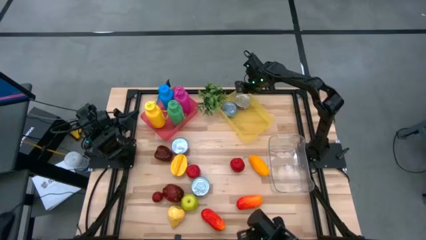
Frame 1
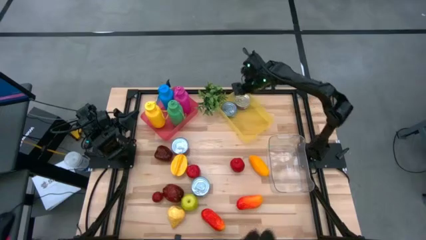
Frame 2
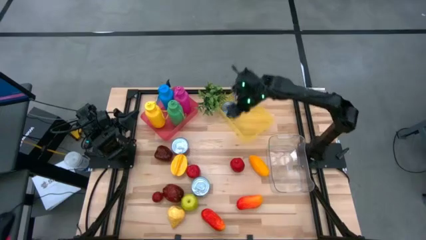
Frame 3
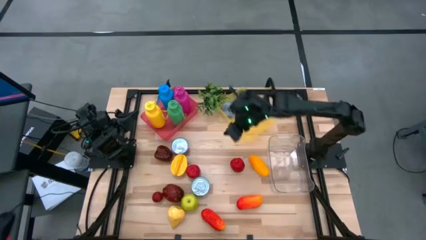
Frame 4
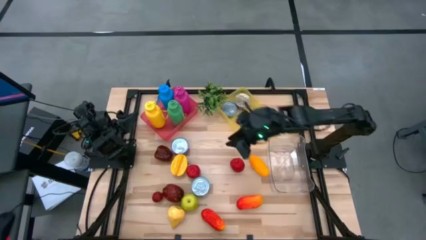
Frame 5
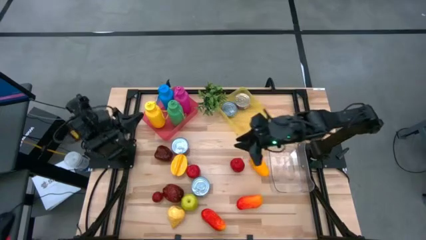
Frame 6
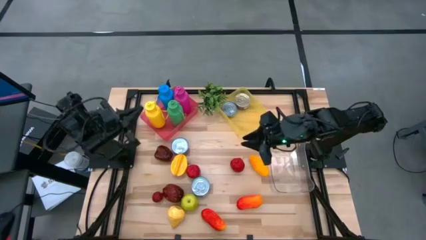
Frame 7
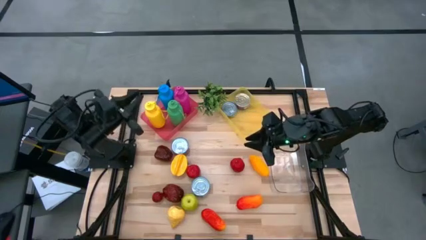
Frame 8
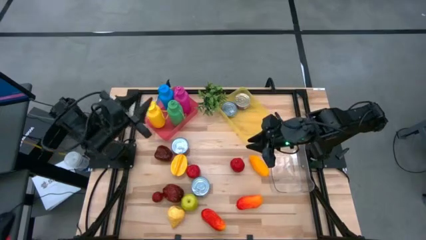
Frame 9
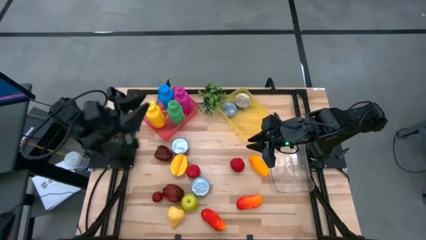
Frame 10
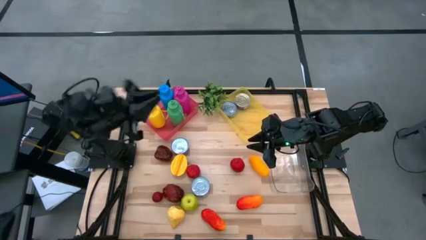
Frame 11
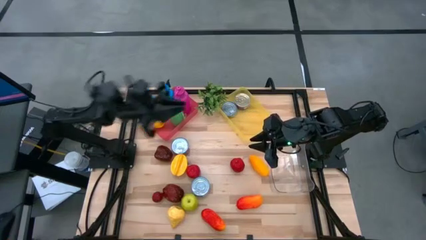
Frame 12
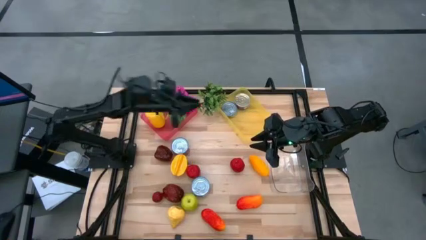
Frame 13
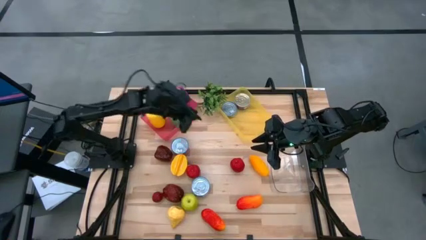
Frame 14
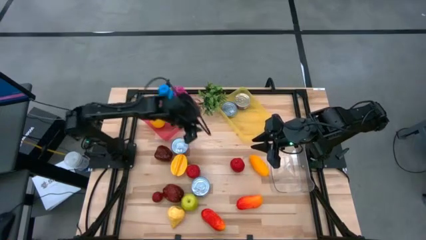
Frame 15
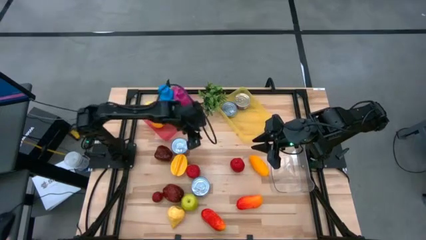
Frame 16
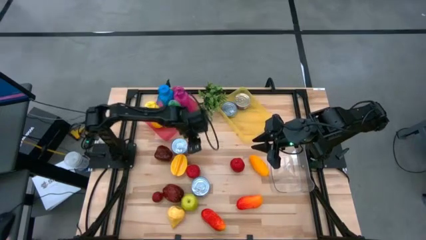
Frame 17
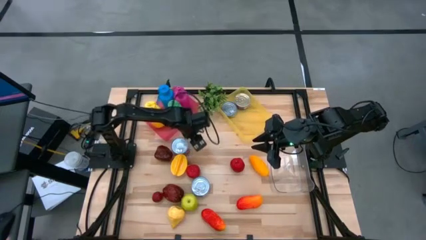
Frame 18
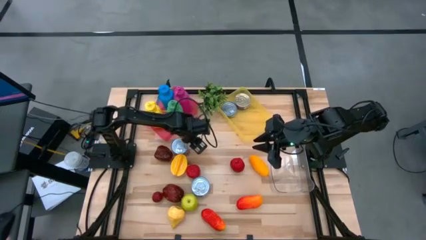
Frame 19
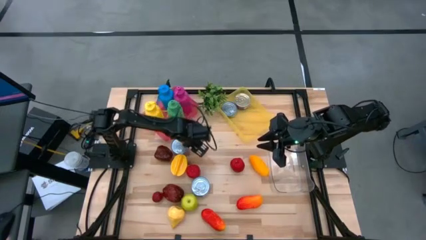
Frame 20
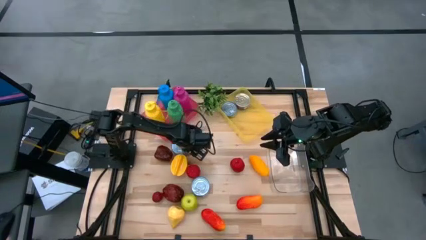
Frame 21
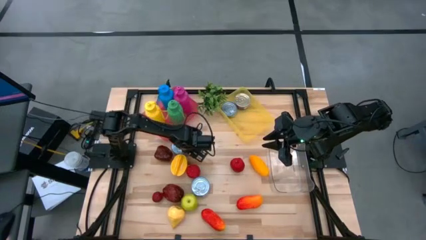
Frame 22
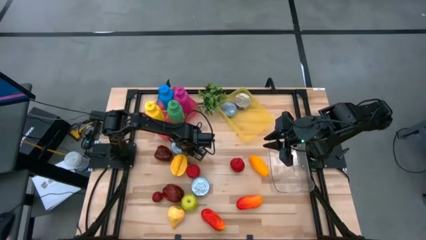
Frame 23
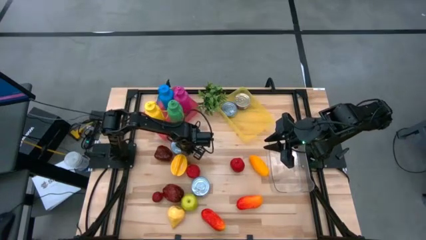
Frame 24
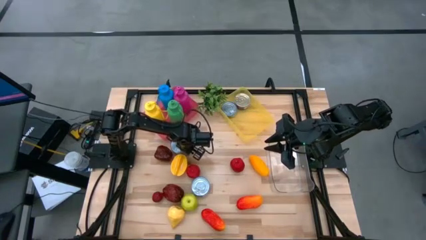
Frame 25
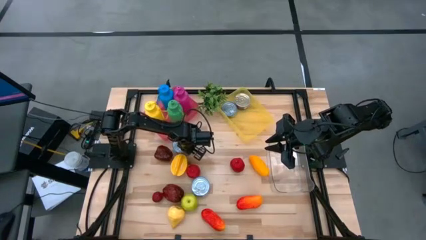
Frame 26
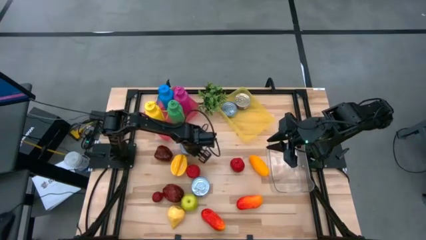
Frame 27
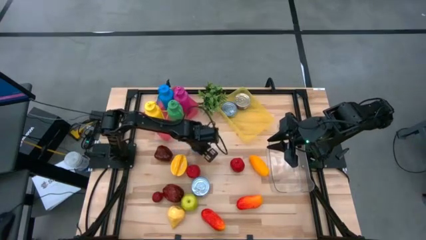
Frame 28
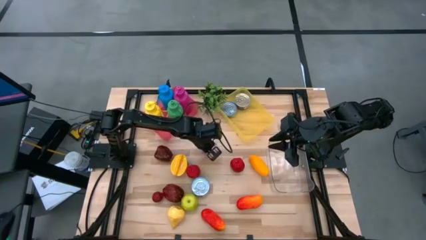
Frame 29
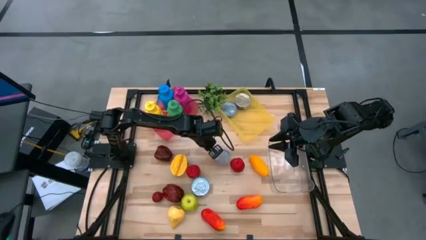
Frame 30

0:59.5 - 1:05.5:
Task: Pick & Place Food Item
Put the red tuna can into the yellow bin

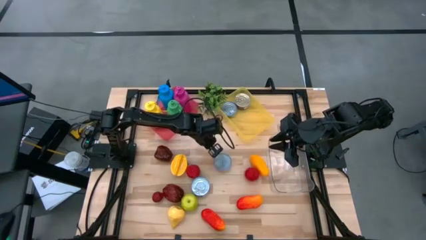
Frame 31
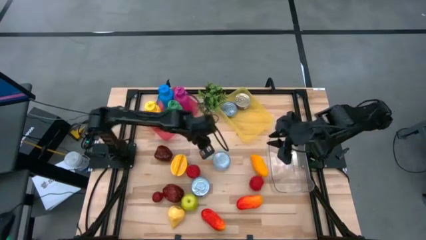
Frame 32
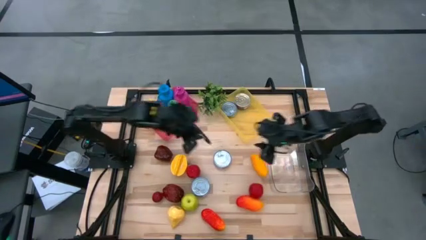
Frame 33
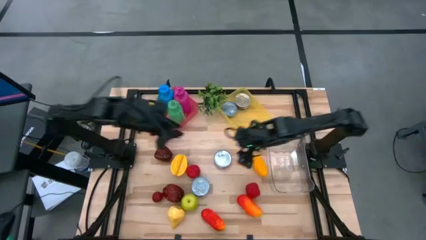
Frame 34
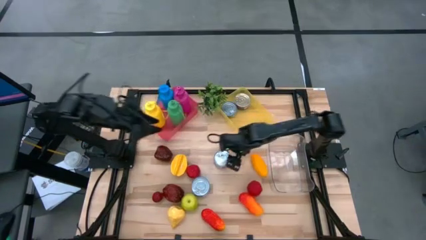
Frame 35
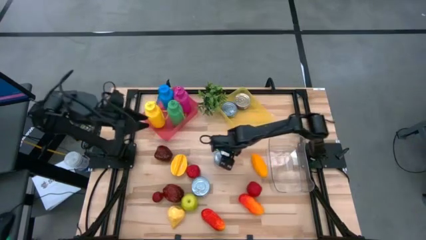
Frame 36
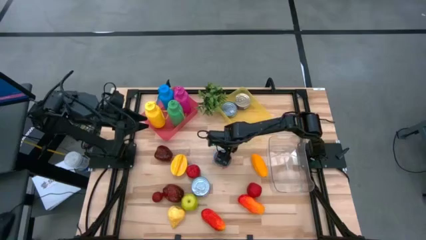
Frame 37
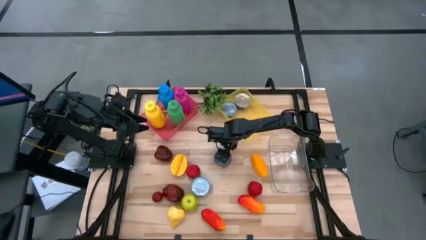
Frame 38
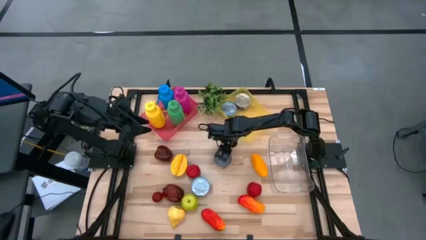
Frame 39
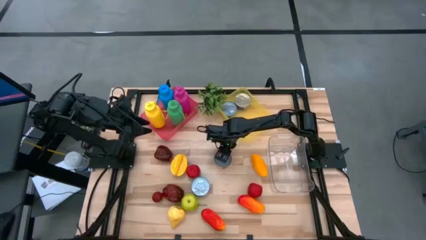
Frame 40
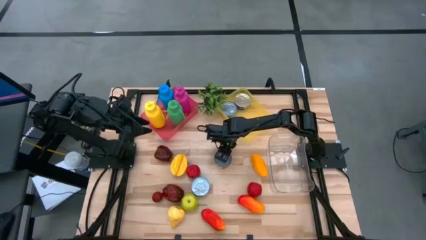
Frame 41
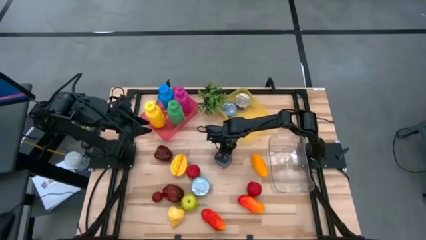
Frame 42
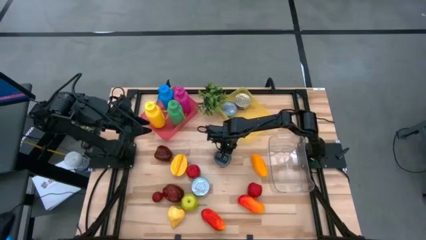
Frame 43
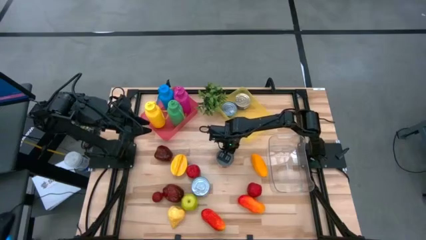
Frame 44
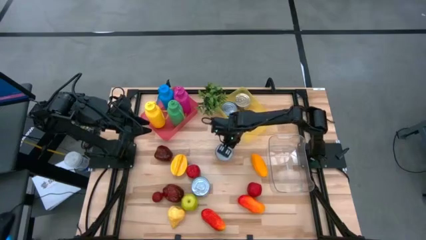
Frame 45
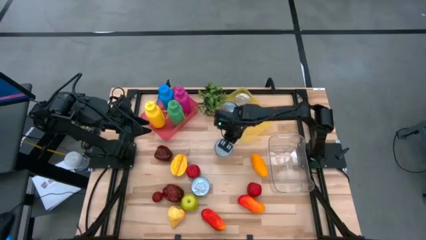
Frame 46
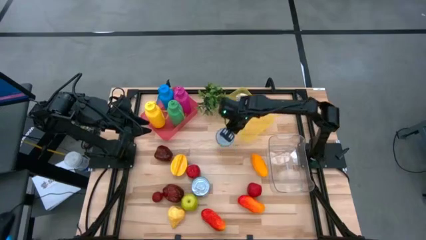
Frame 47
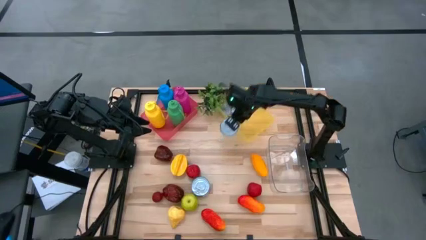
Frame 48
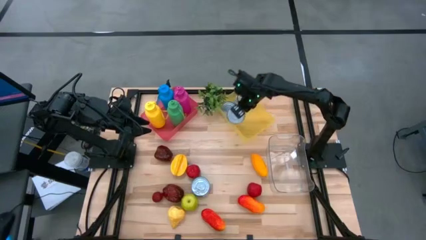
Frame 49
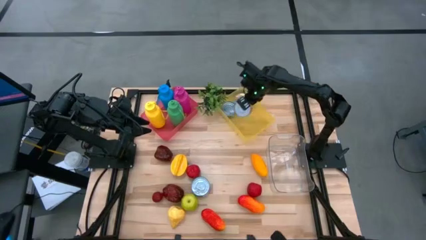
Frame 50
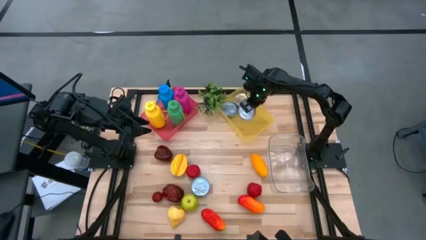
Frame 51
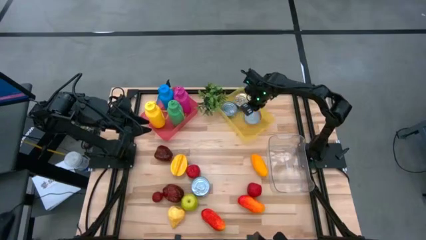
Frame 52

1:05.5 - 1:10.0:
Put the red tuna can into the yellow bin

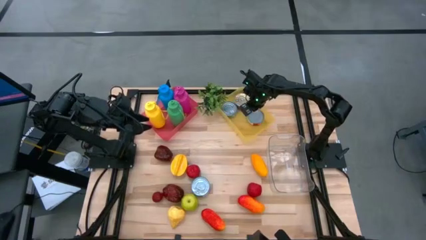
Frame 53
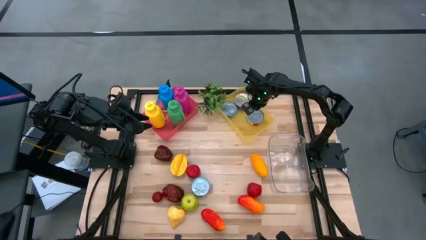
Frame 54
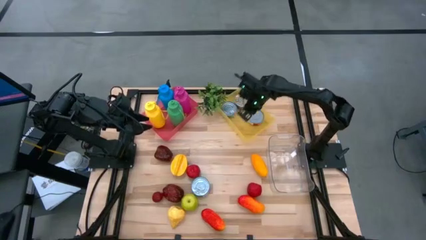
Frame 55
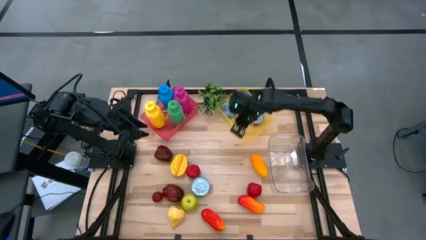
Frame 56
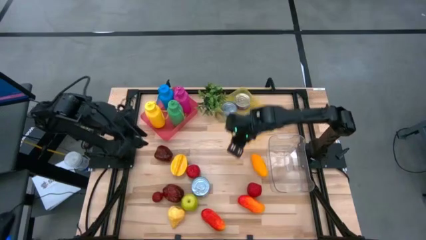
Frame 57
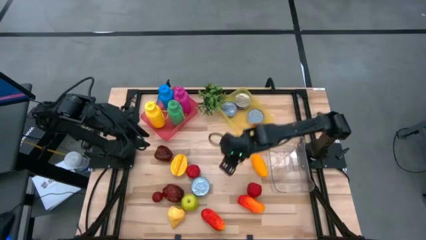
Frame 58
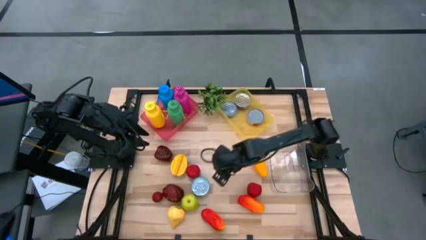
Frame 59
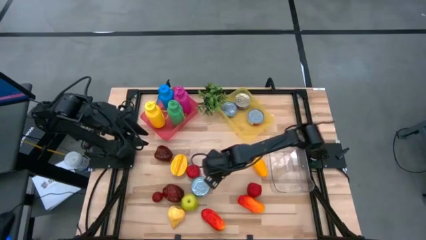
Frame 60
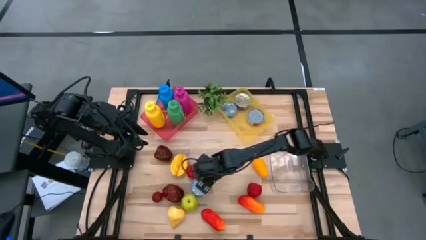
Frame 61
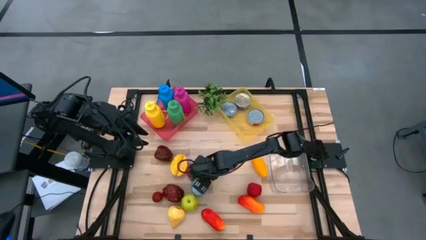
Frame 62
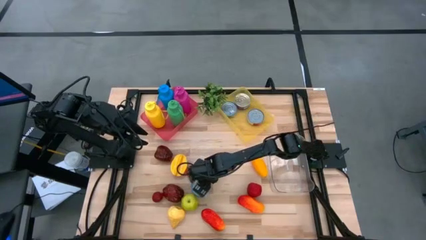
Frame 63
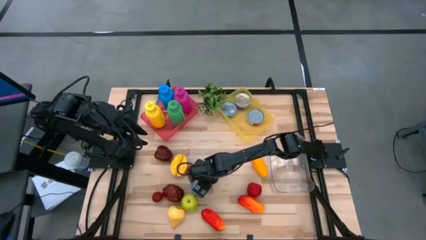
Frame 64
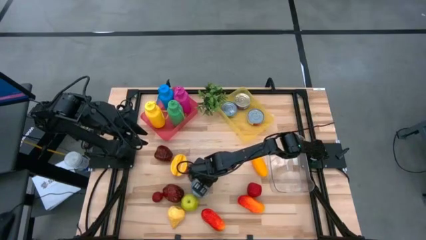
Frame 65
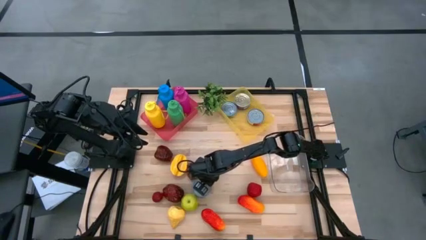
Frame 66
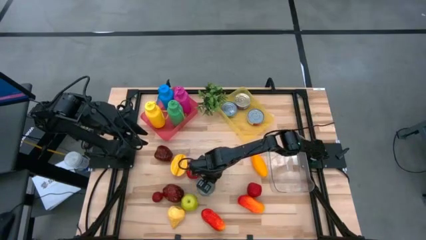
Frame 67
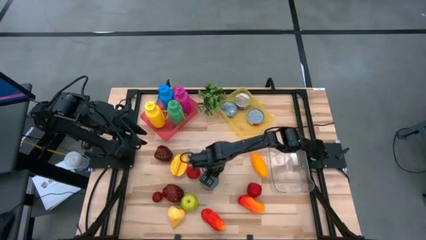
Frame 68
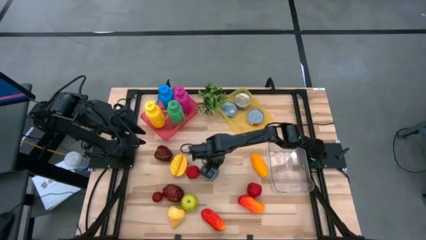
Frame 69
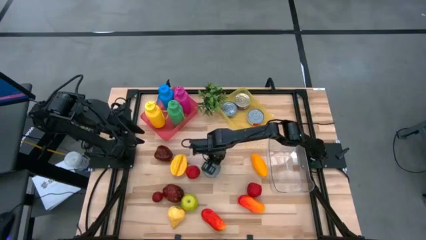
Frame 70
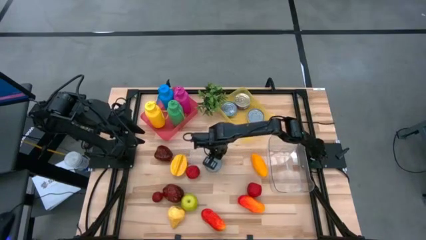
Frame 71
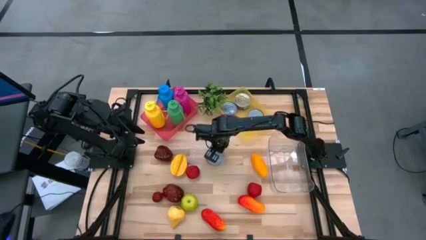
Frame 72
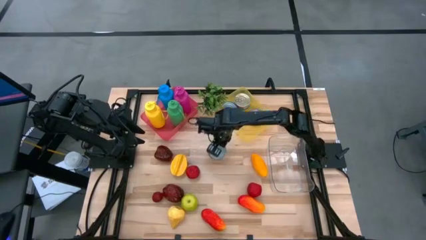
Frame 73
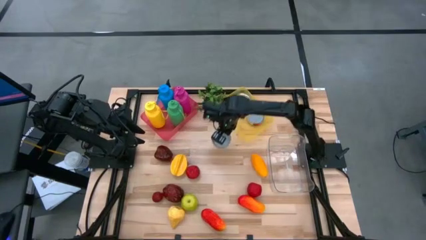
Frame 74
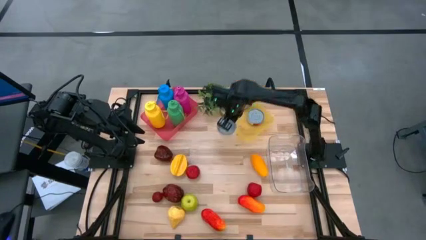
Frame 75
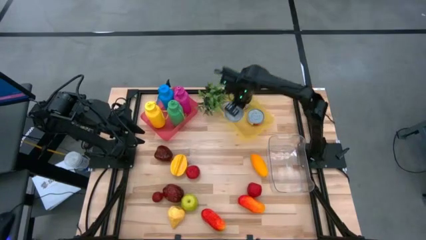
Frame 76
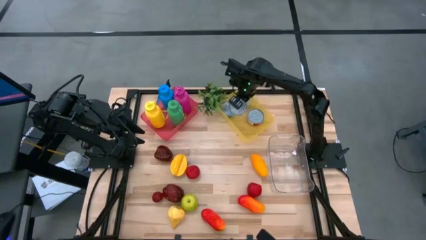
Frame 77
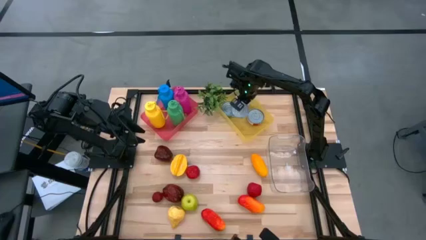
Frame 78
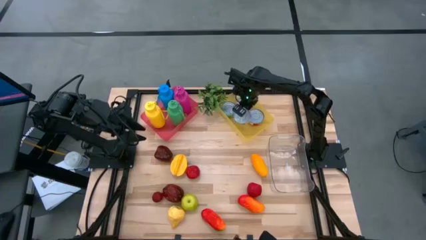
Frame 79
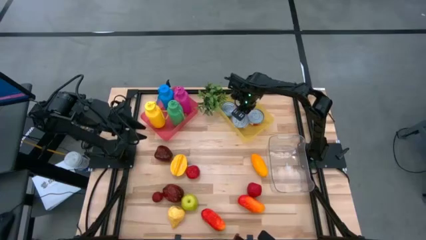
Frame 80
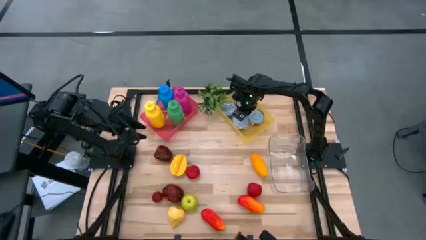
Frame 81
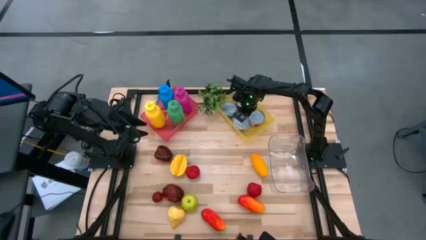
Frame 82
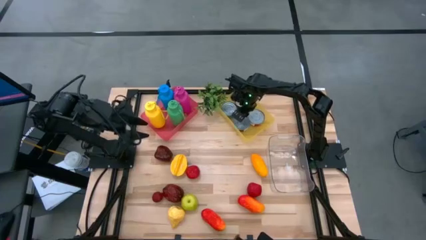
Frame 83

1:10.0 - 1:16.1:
Put the blue tuna can into the yellow bin
